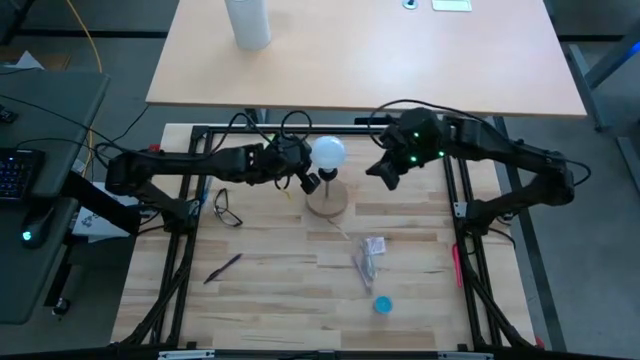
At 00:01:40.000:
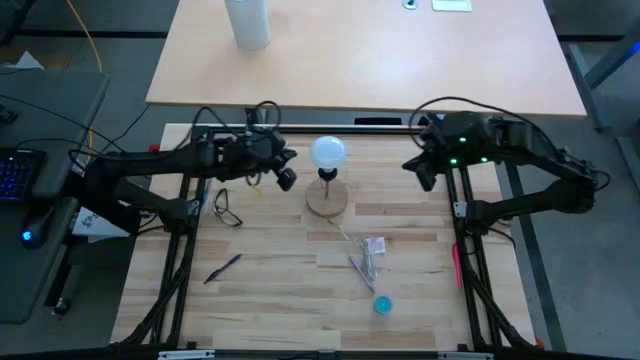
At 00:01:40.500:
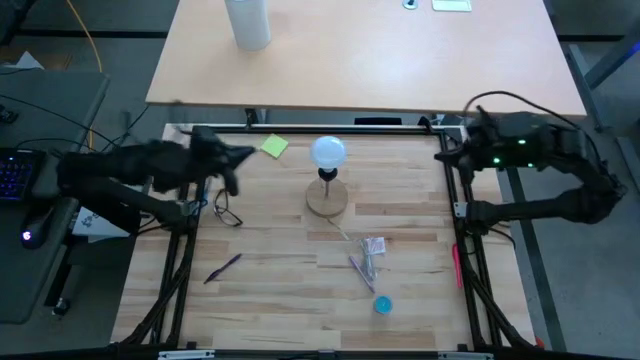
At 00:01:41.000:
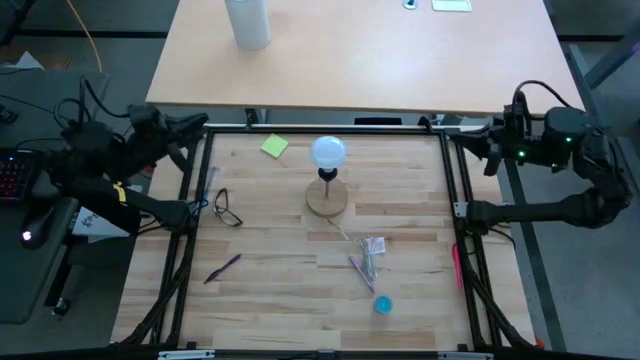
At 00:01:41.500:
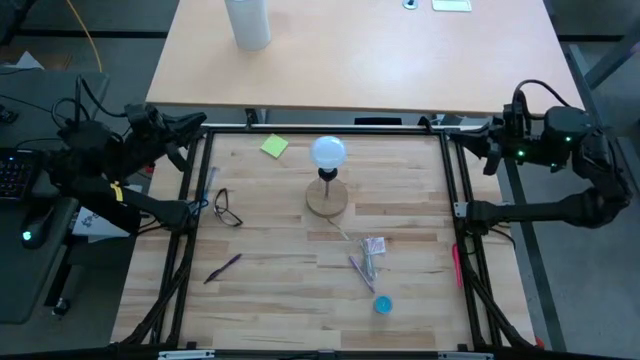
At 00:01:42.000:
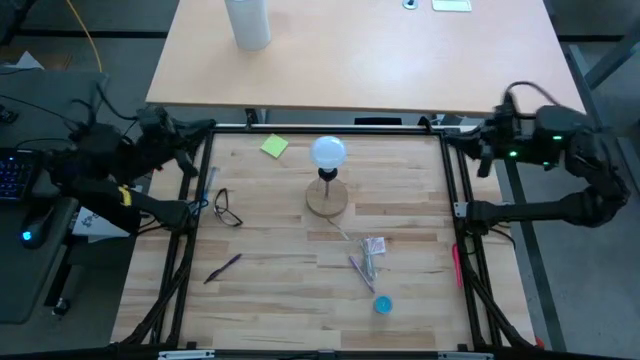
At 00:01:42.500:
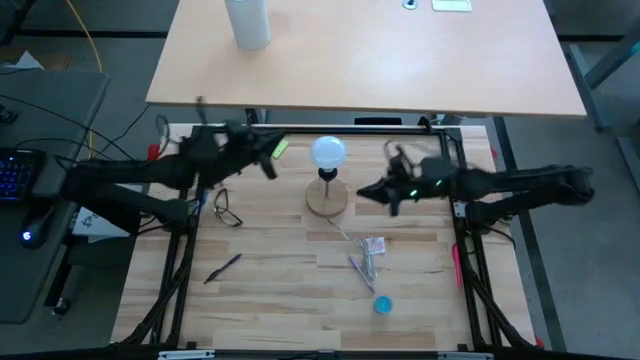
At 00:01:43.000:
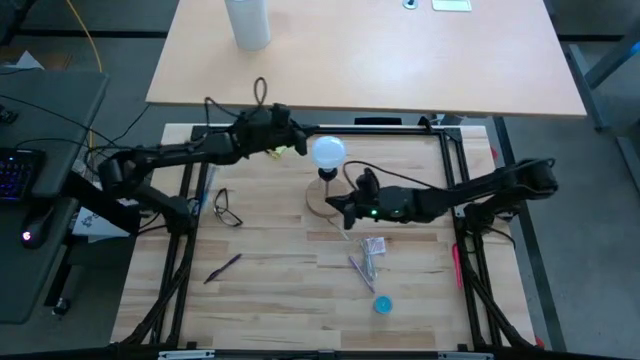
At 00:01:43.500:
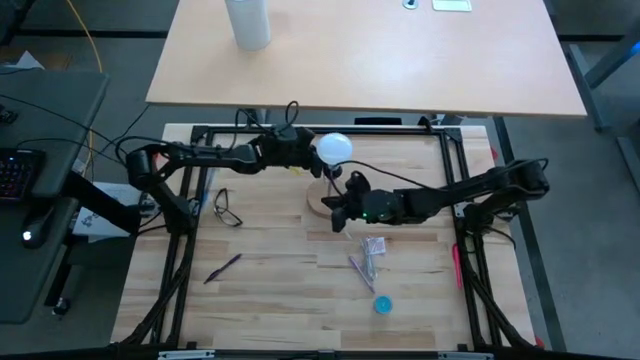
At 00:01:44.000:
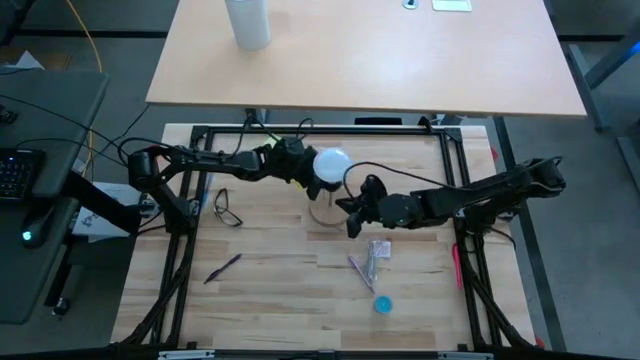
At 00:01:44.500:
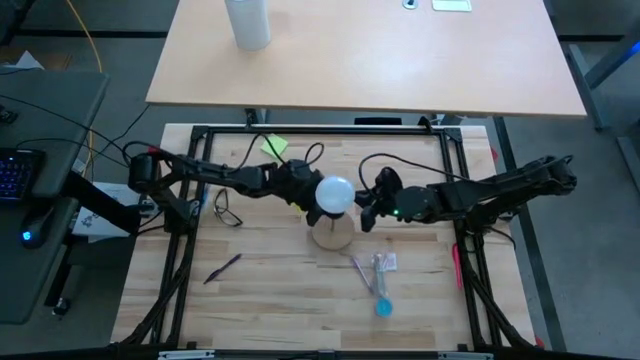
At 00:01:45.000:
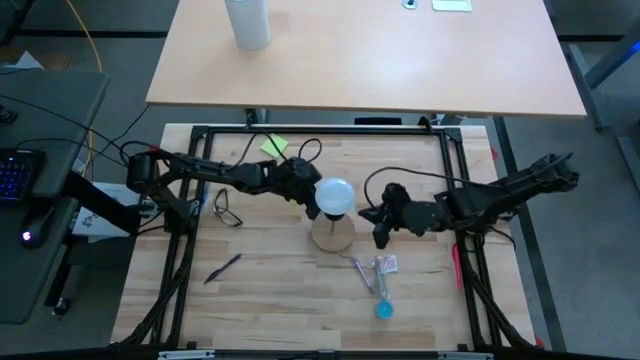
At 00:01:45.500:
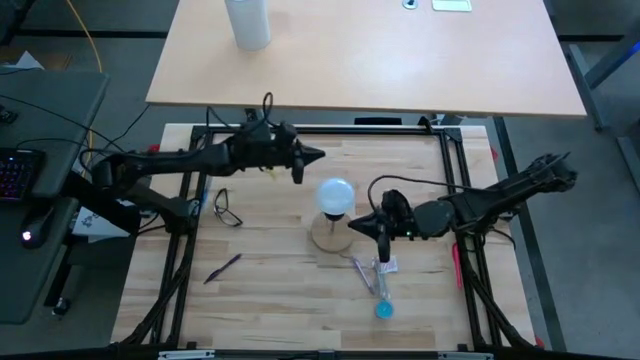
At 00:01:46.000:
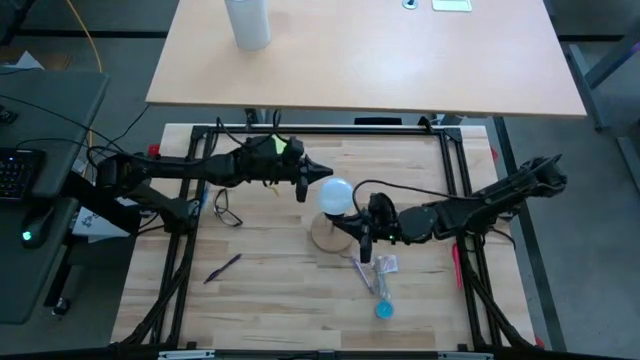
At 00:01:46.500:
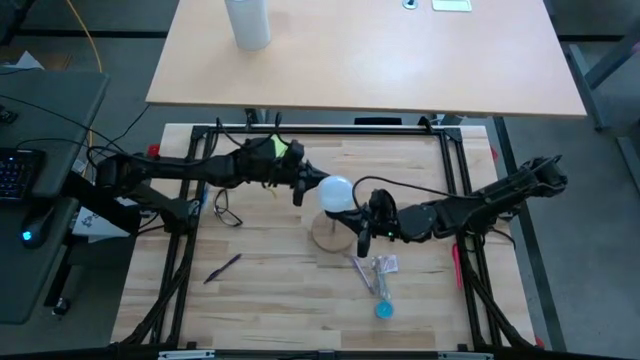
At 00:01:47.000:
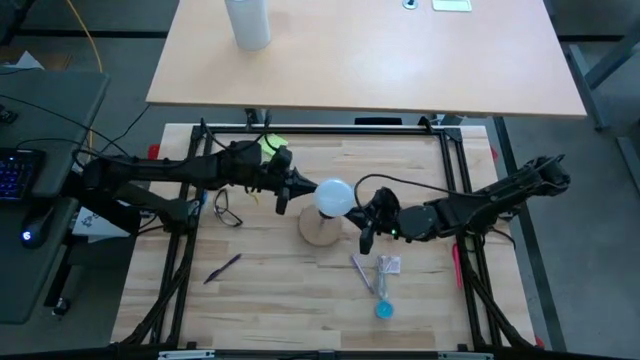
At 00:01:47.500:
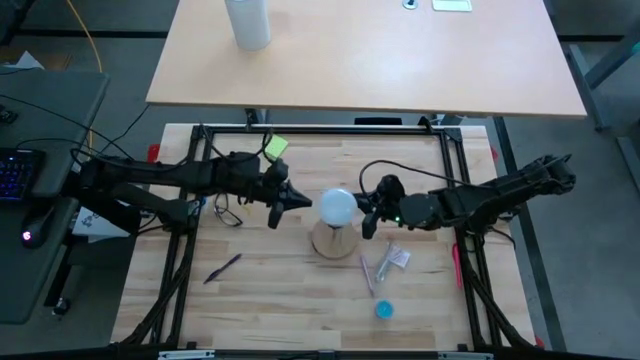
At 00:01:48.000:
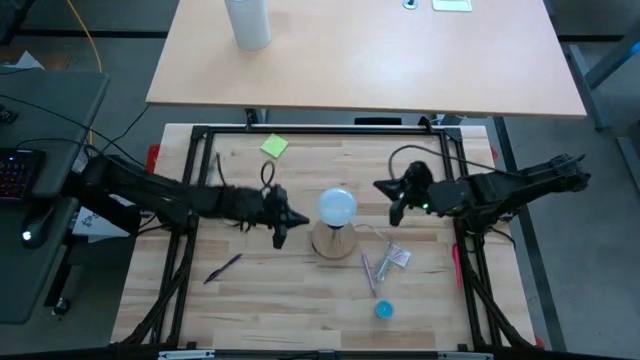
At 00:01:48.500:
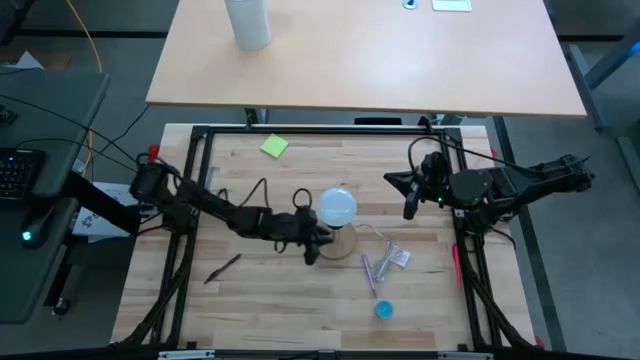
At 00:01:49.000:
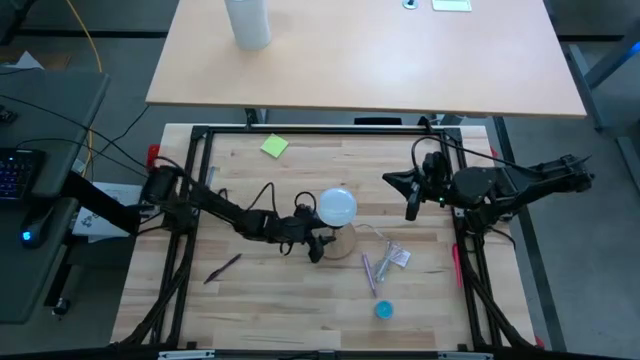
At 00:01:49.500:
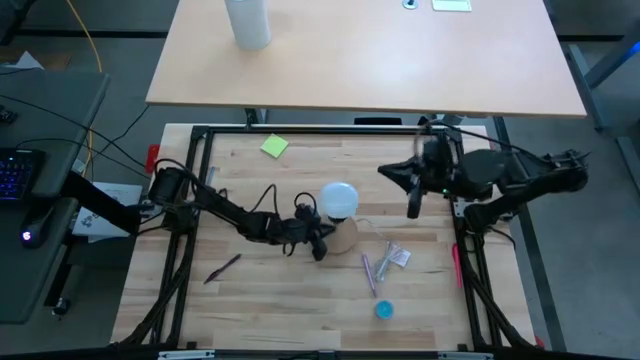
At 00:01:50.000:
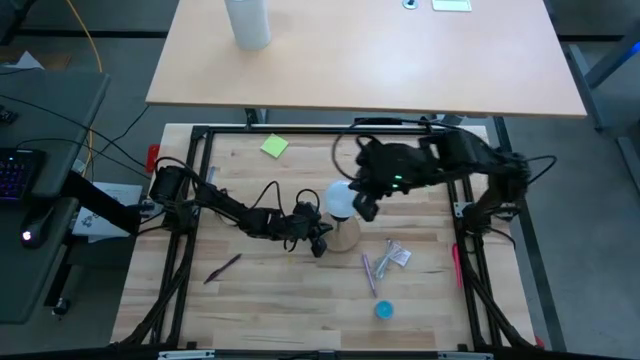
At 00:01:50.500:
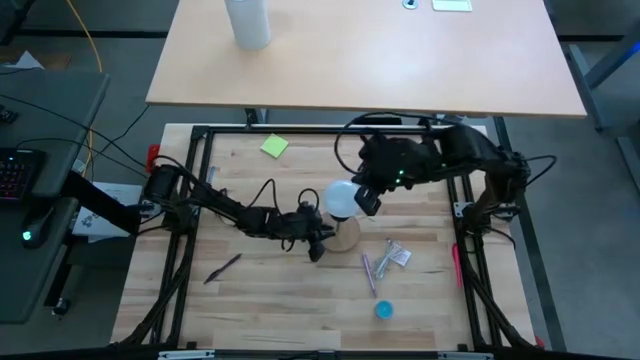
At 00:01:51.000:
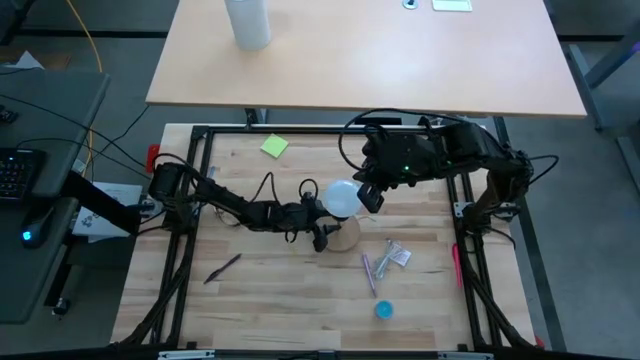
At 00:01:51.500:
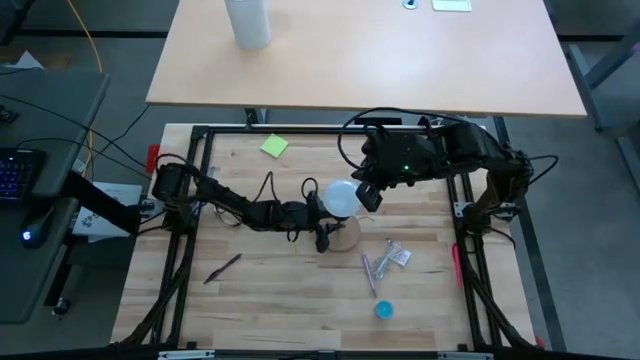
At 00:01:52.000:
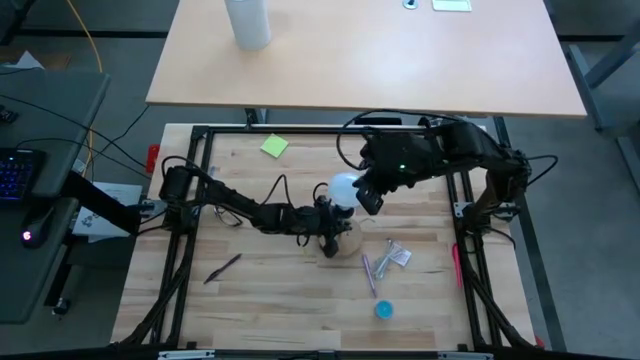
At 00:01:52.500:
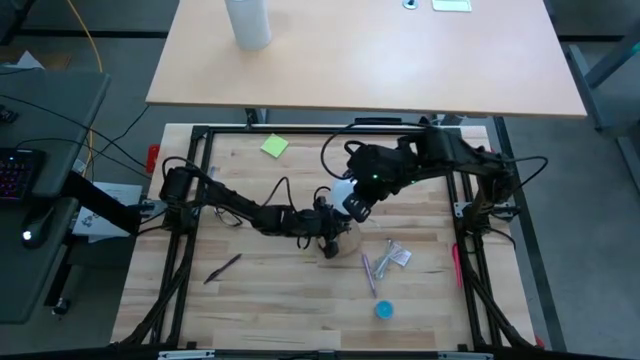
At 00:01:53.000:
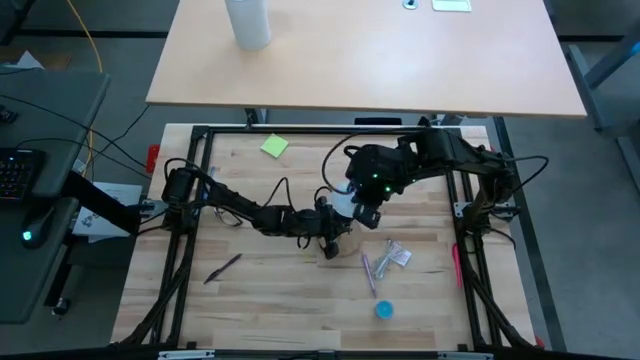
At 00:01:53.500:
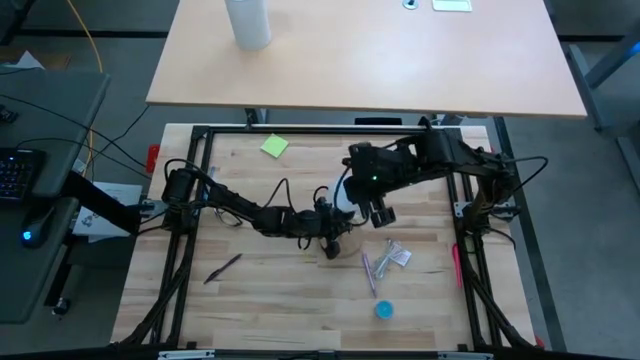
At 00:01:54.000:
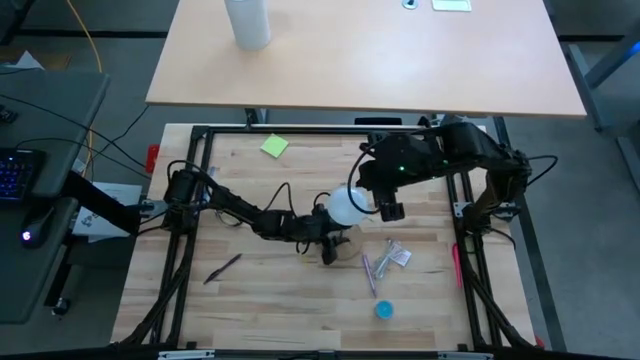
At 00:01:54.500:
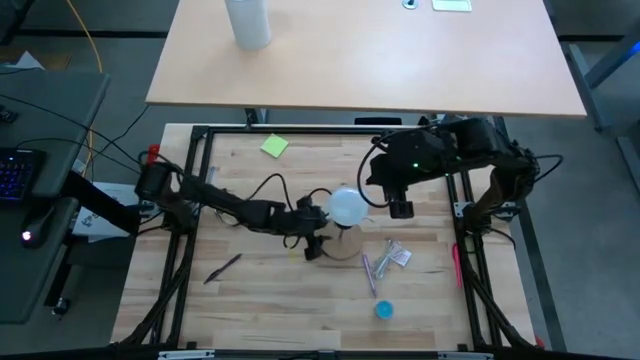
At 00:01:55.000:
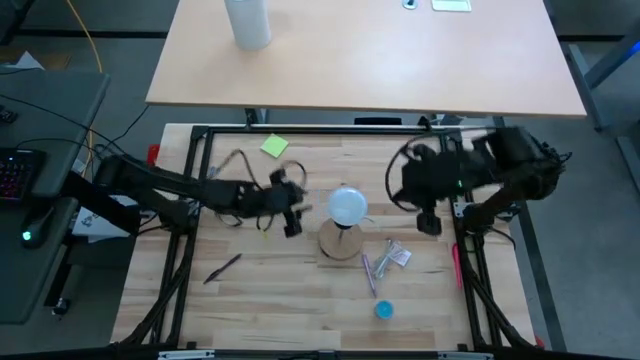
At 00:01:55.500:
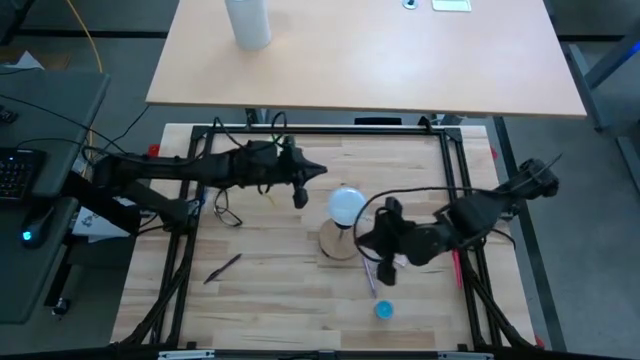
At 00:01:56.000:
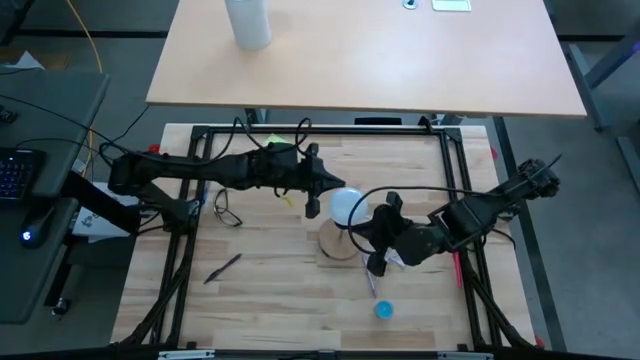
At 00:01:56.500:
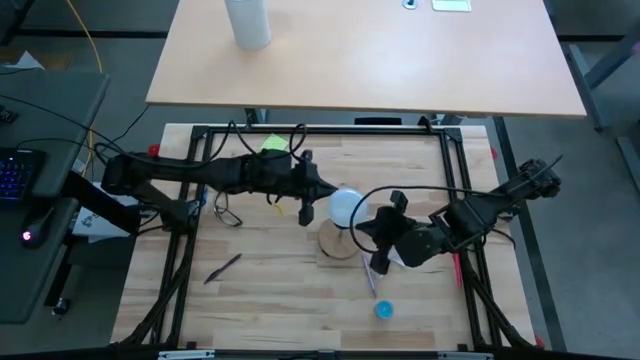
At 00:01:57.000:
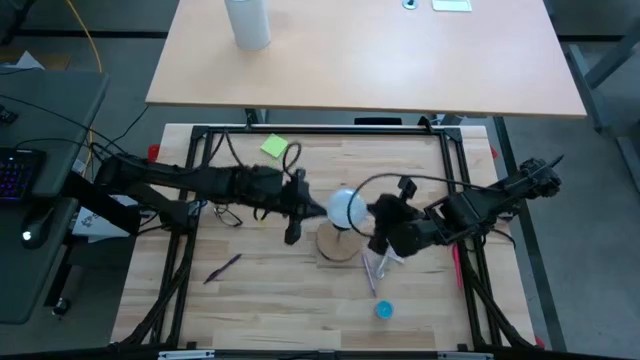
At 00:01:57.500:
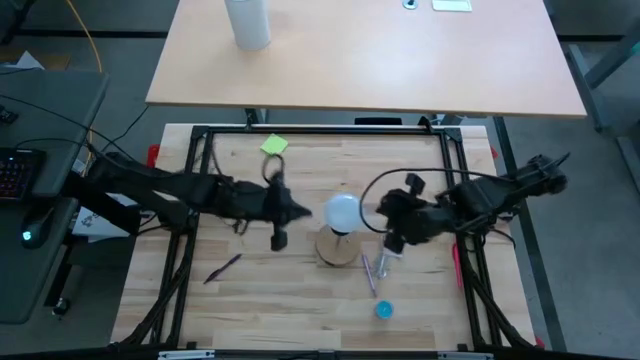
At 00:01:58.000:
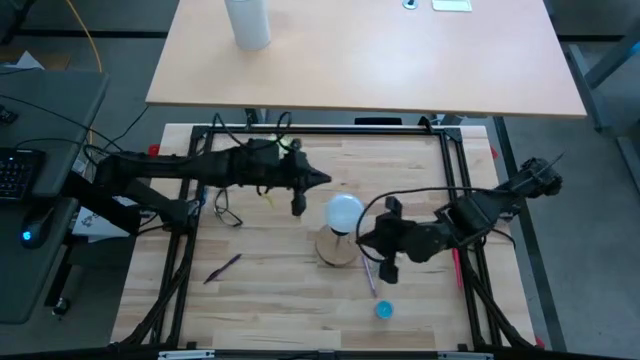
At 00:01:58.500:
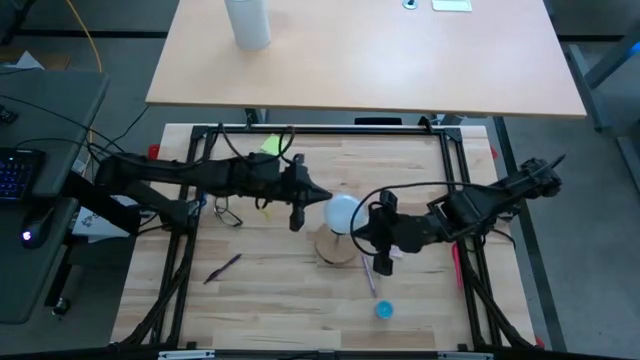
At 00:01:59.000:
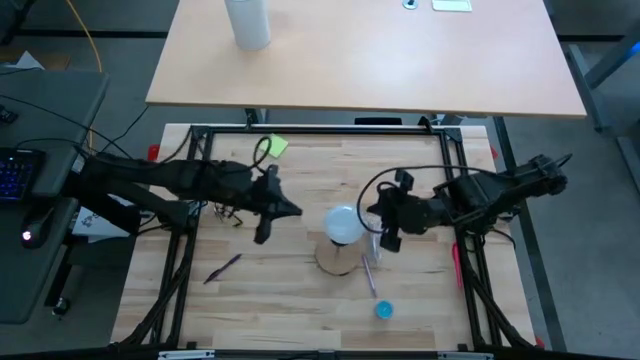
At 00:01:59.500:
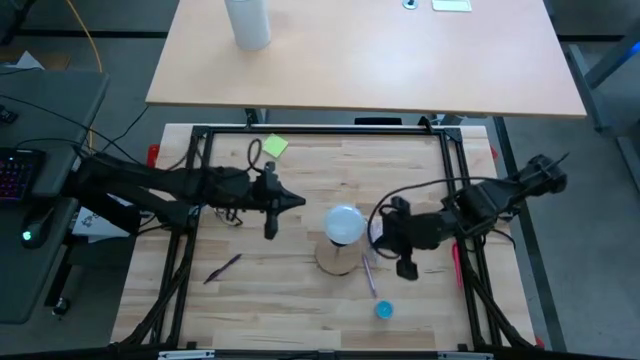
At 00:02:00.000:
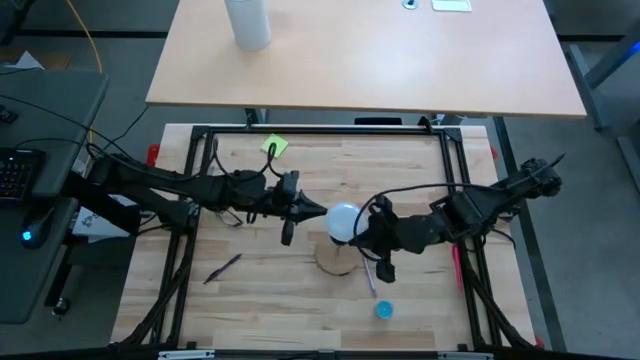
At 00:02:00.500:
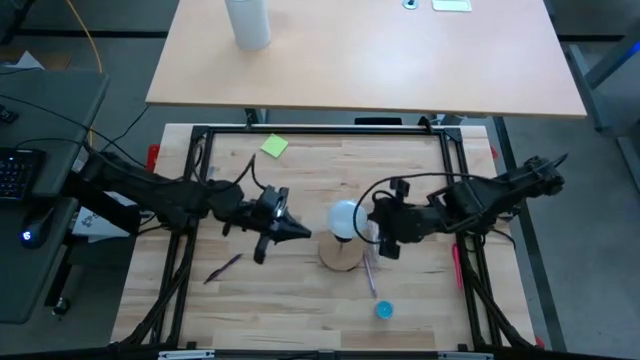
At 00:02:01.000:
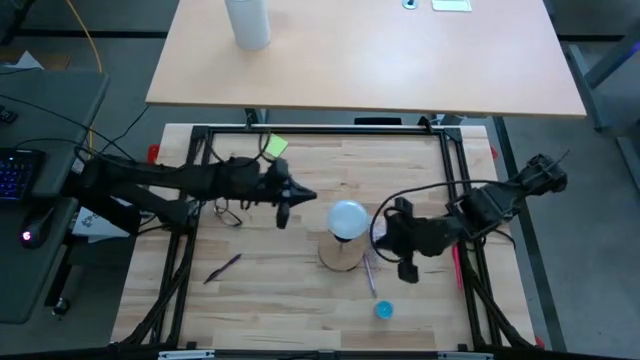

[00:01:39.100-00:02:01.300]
Task: Screw lightbulb
Remove the lightbulb from the lamp
